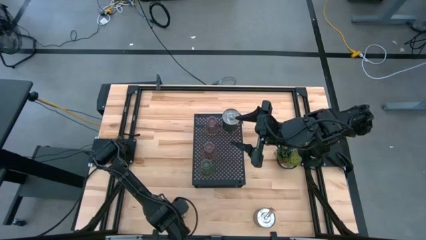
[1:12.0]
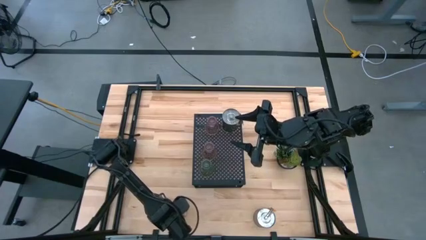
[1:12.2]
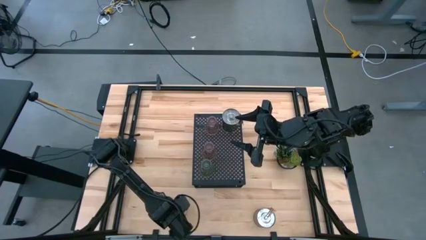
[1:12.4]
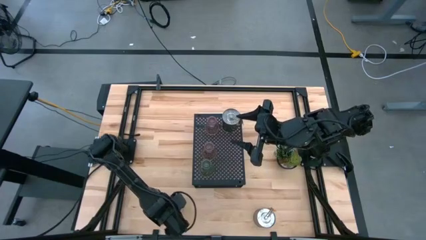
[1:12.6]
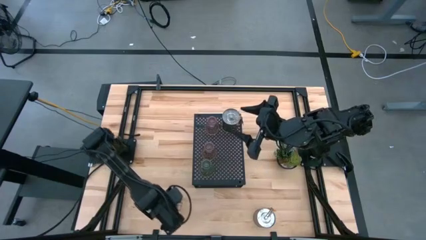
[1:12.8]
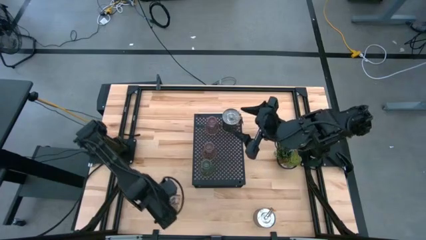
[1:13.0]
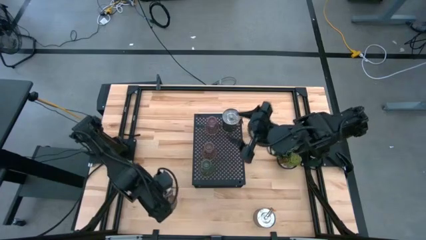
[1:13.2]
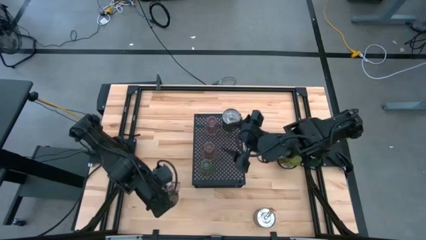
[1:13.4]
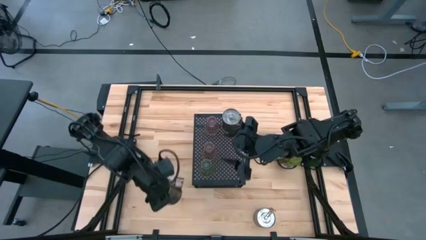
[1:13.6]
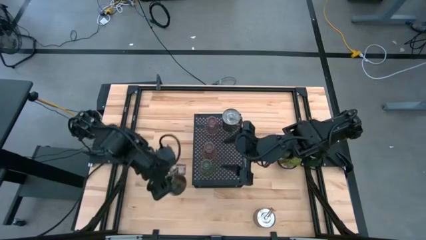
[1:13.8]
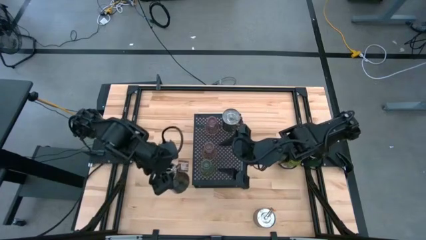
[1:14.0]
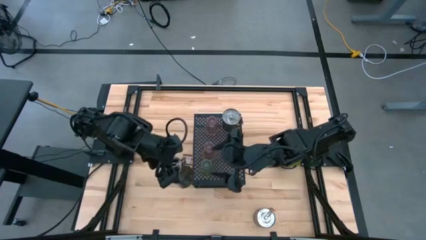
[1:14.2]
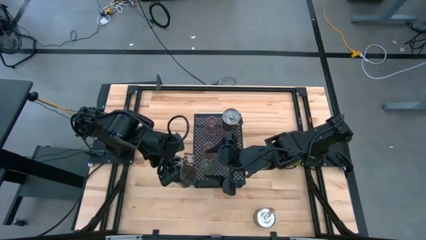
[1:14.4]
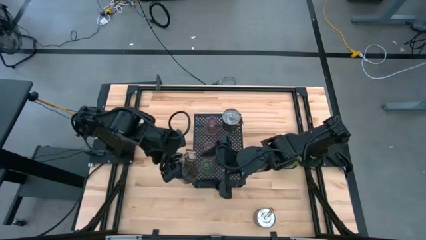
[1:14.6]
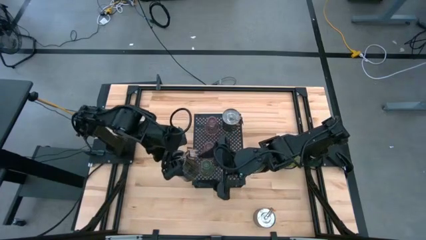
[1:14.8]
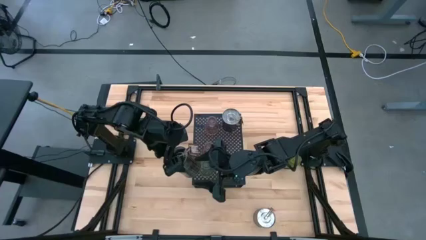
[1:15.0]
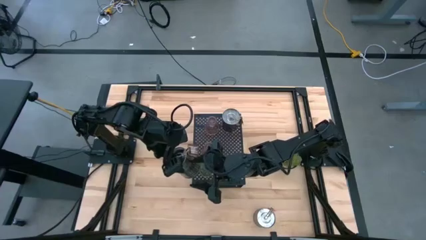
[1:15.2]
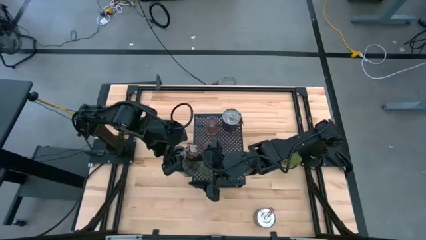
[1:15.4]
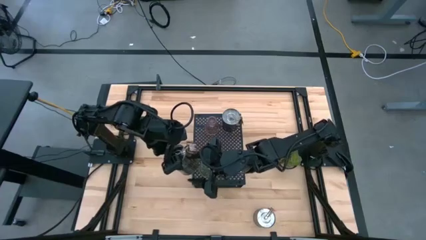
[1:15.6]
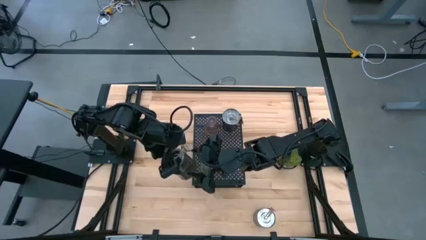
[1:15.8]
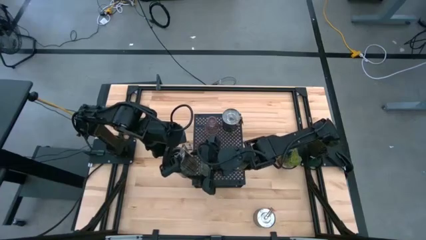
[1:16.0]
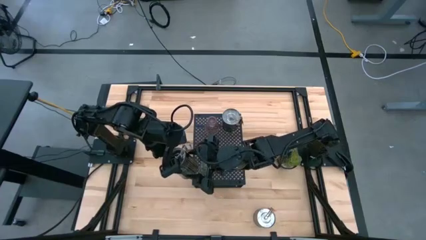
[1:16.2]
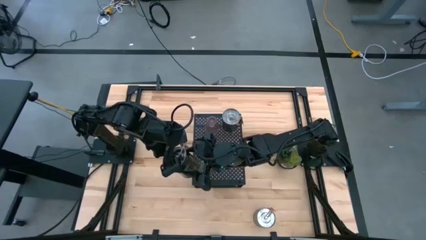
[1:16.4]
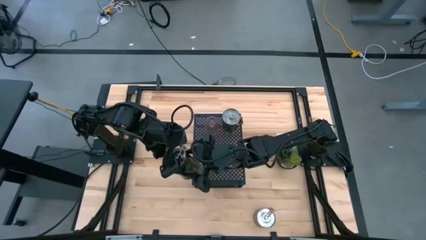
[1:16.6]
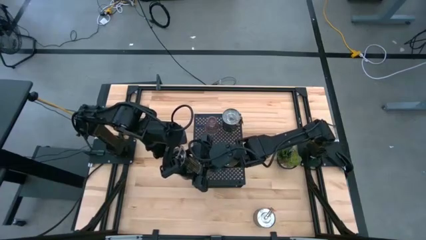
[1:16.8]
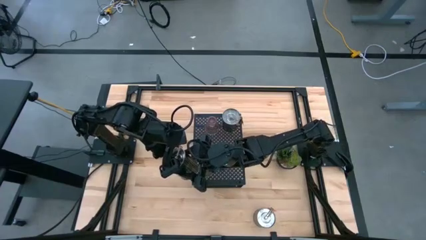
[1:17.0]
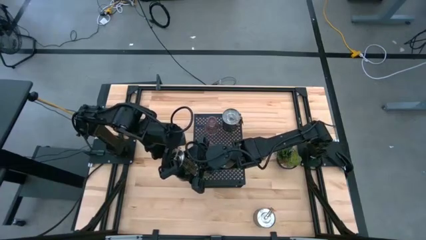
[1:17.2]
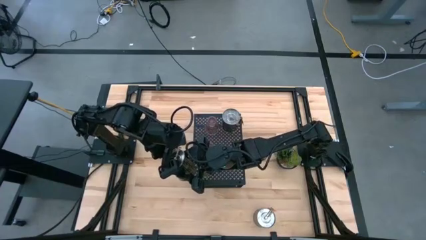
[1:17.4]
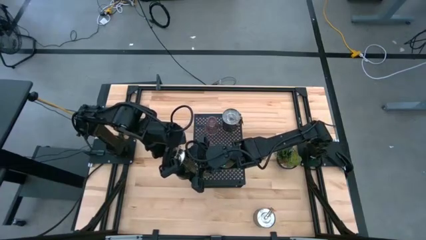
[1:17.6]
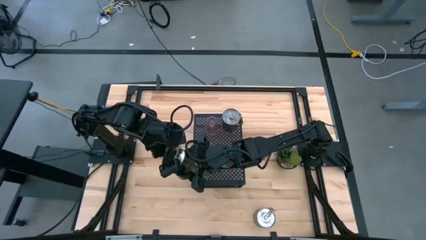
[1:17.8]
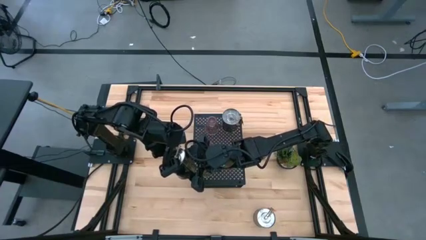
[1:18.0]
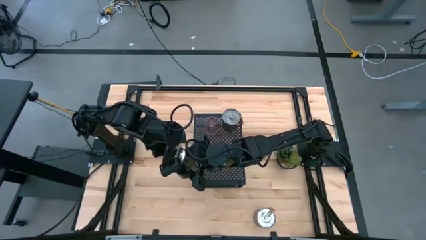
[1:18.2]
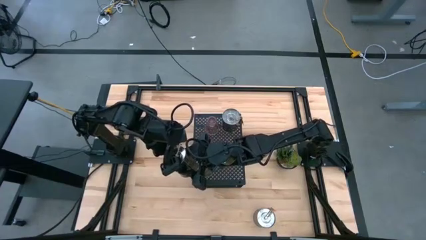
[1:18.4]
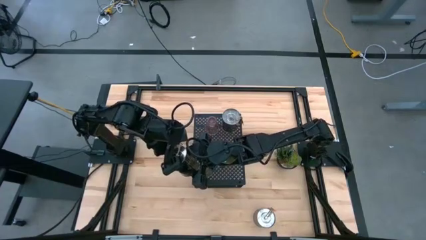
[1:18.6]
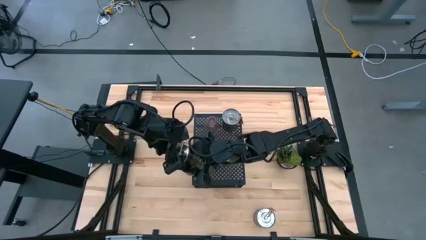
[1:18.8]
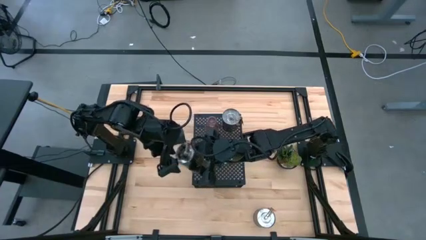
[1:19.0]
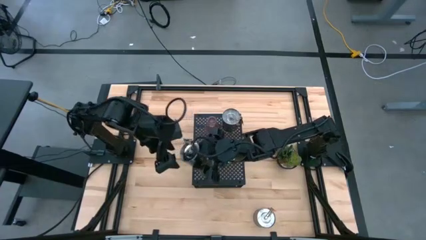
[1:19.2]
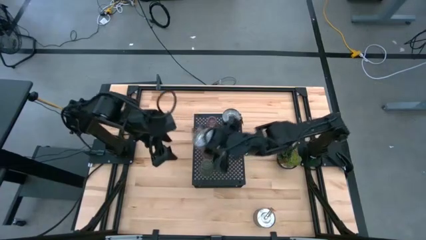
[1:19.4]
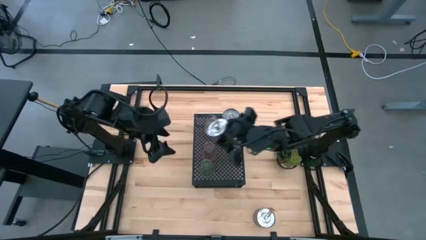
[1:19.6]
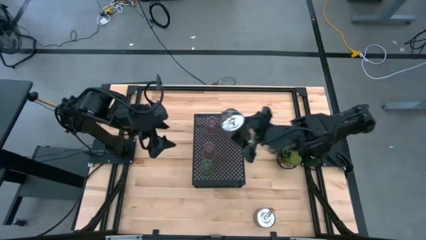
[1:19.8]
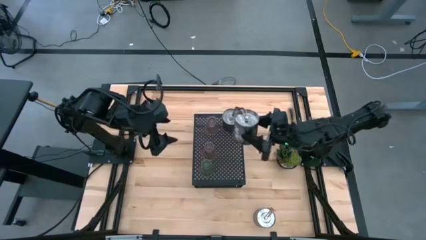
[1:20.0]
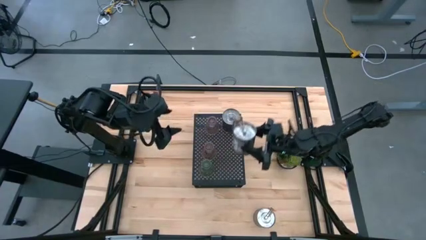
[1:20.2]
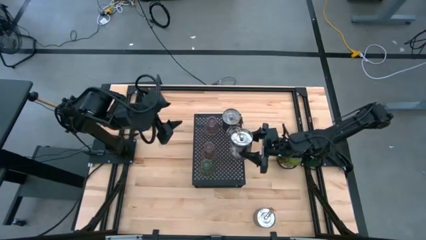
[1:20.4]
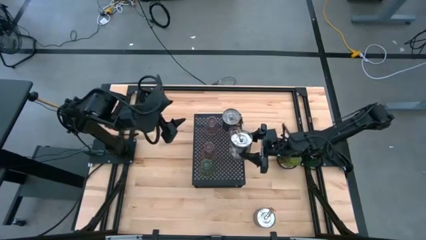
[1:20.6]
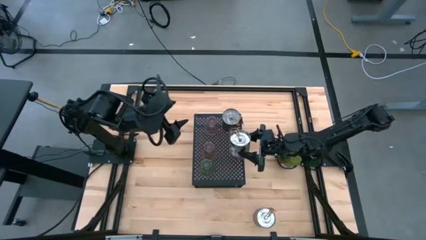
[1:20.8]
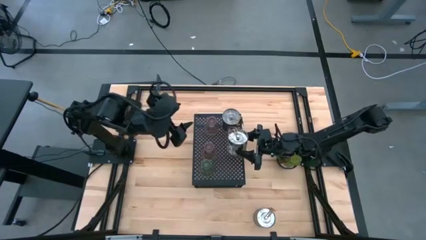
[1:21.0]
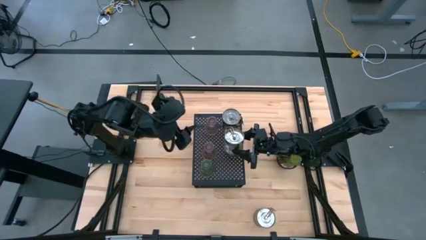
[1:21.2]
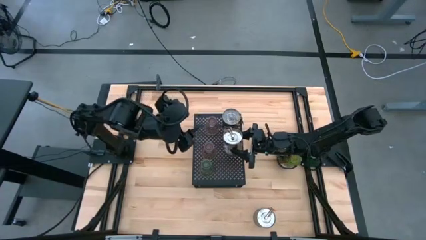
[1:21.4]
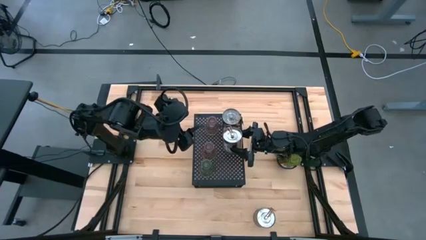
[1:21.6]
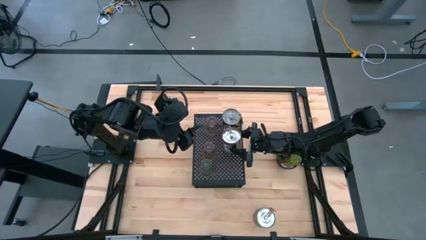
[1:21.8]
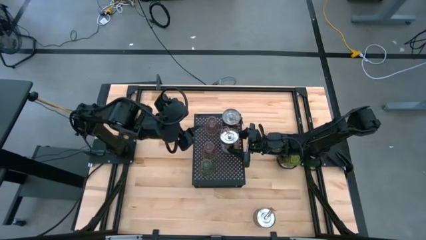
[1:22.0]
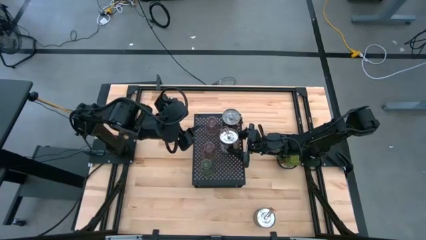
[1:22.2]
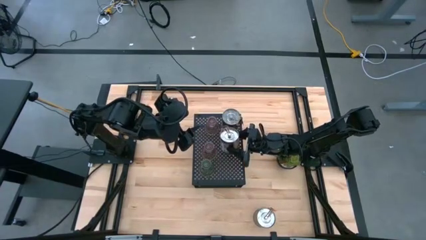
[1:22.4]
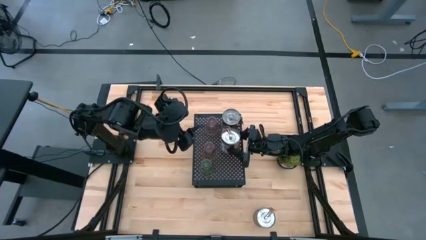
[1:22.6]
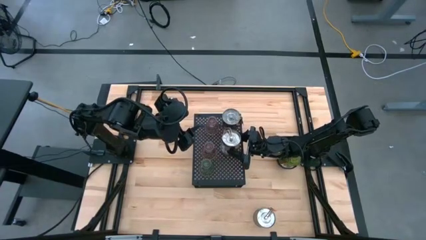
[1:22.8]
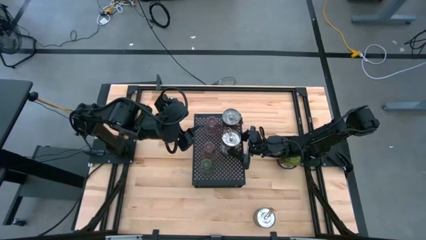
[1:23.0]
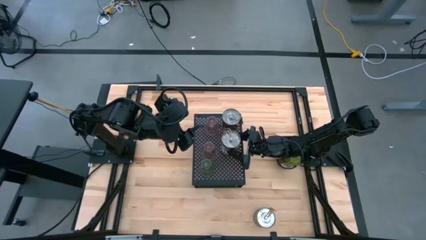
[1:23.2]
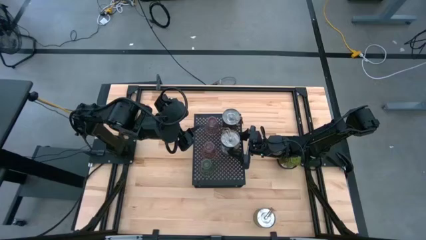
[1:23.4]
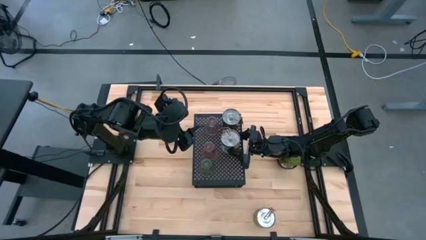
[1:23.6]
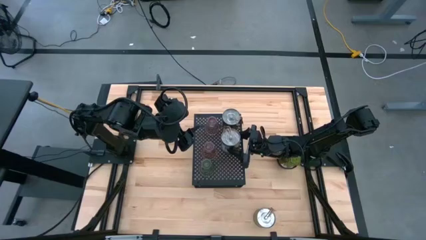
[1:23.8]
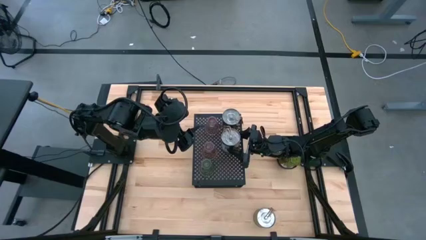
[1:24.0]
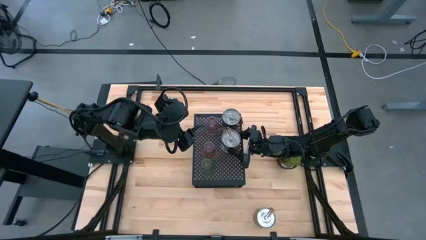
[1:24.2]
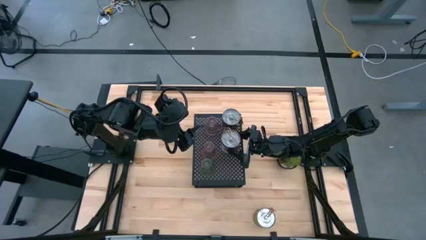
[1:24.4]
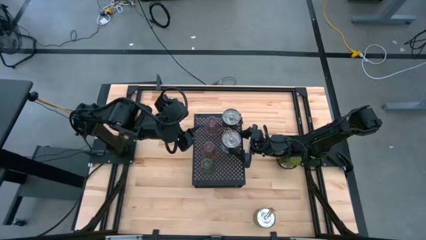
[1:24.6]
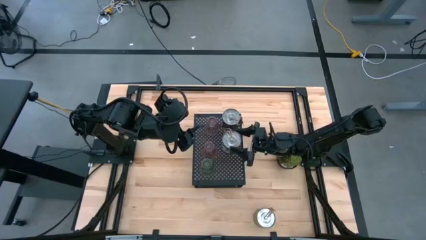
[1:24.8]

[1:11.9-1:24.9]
Task: Pick & Place candle stick holders
Put the brown scented candle on the shelf

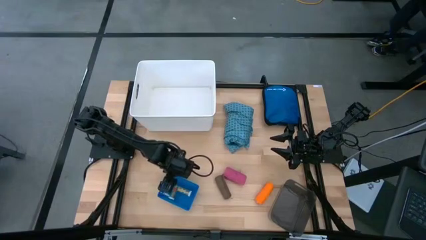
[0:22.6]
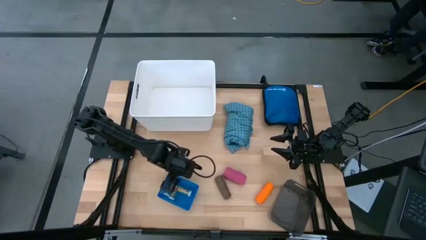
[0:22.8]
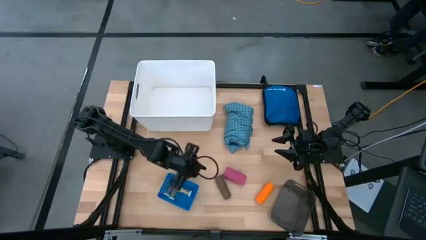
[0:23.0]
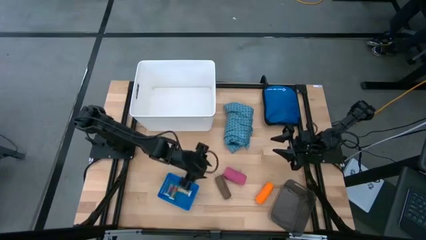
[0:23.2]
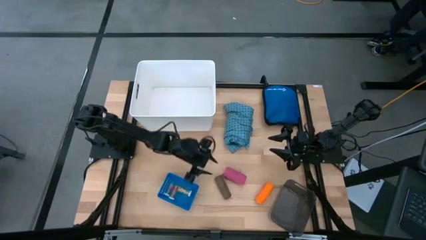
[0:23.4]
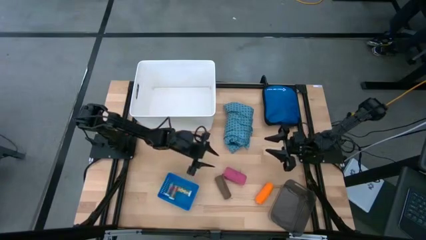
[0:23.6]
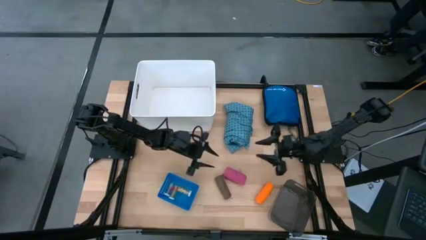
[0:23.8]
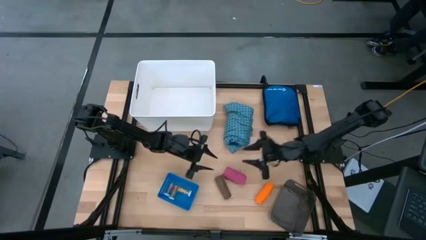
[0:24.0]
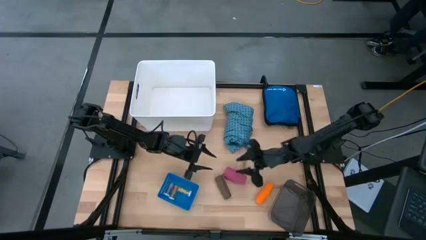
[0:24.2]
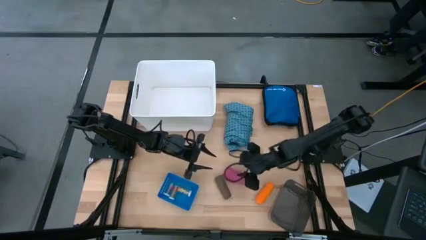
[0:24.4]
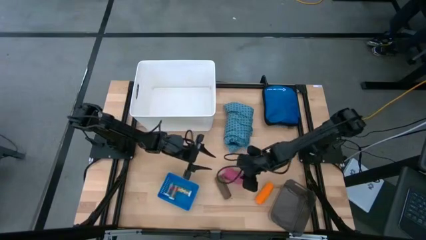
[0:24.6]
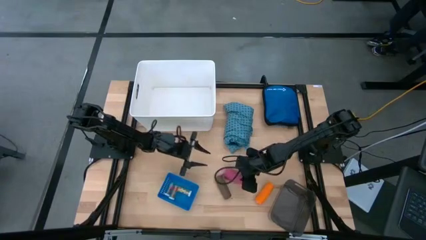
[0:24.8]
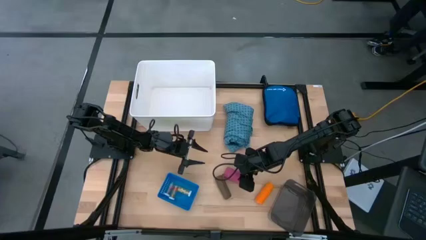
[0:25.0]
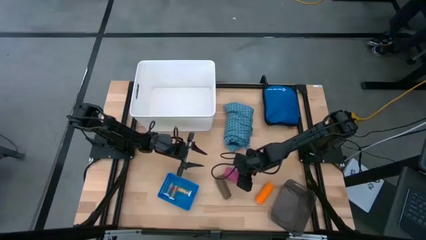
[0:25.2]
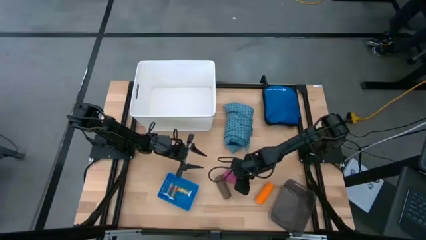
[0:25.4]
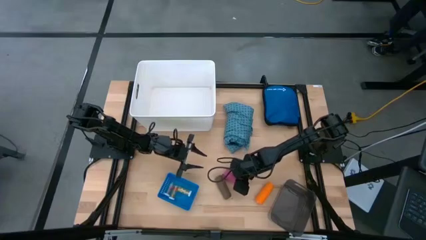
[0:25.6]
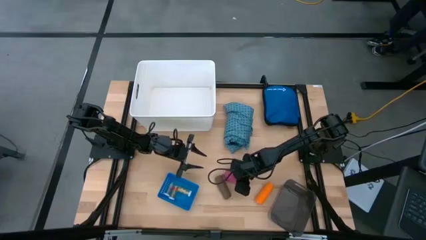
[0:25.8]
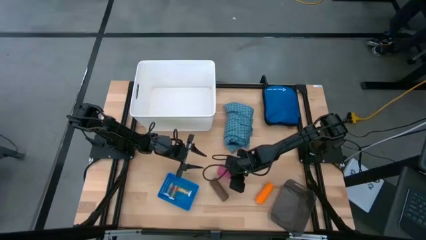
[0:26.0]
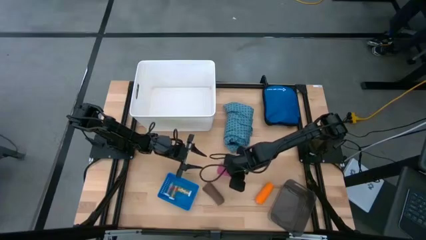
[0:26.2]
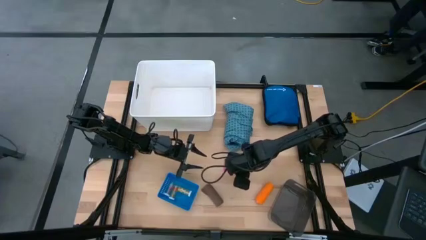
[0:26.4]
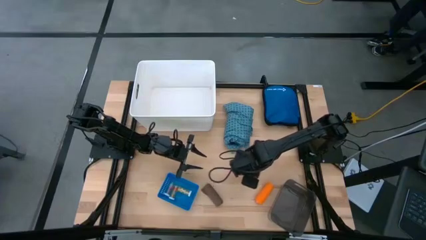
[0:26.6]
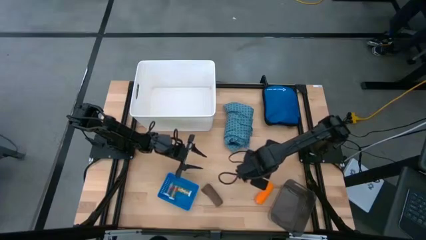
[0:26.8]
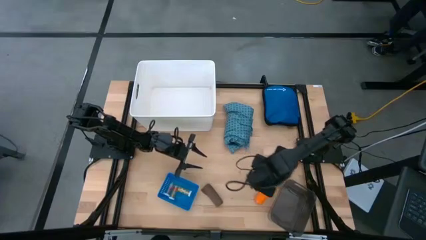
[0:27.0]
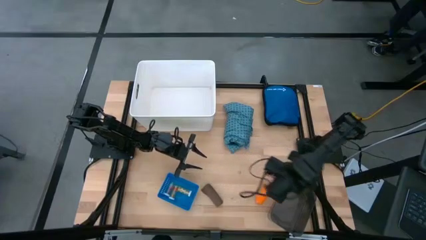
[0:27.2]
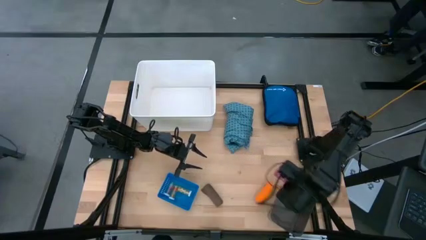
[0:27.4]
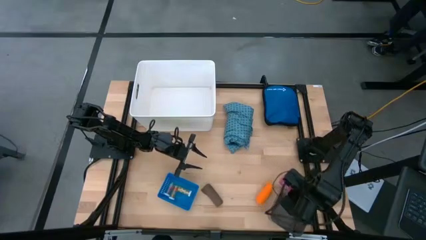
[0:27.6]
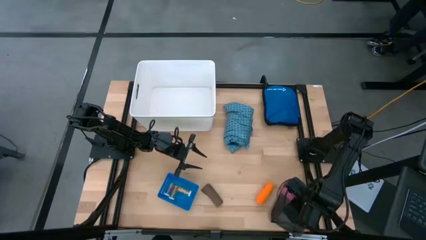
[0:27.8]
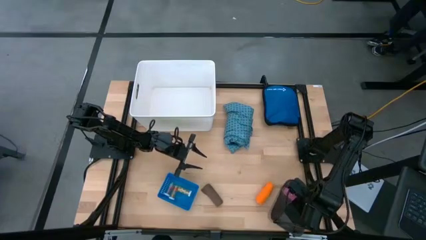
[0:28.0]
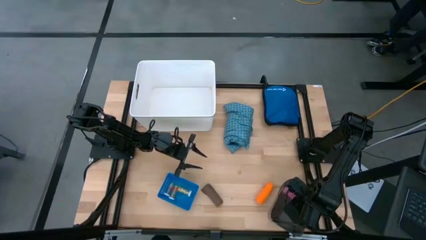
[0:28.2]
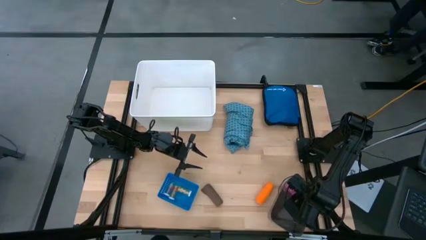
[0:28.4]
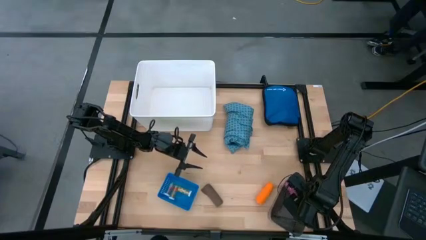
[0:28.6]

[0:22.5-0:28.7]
Task: Pick & Place Medicine items
Put the pink bandage into the black bin
